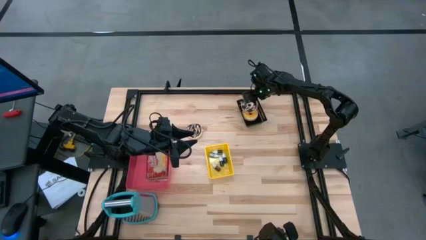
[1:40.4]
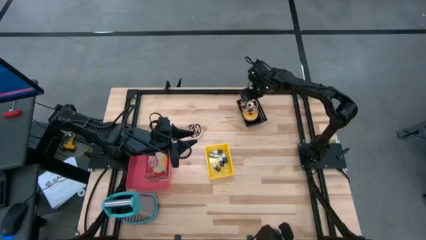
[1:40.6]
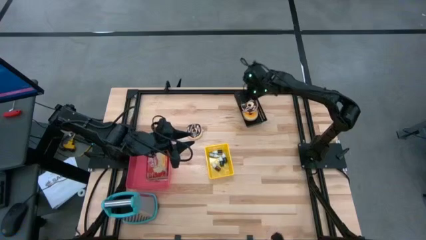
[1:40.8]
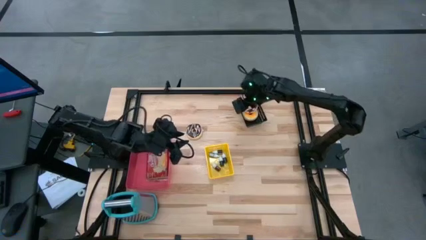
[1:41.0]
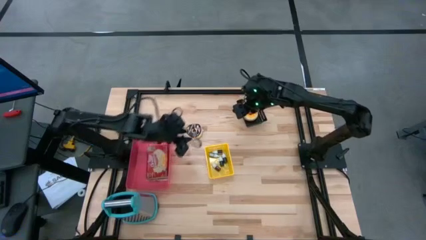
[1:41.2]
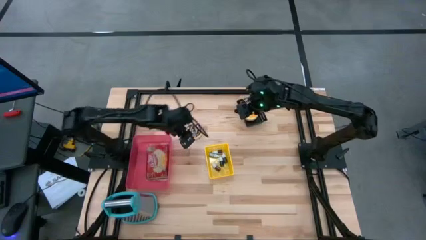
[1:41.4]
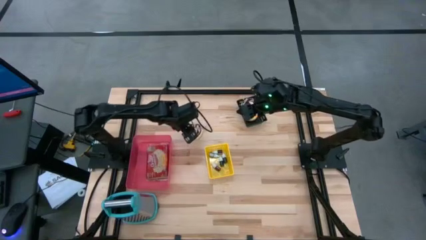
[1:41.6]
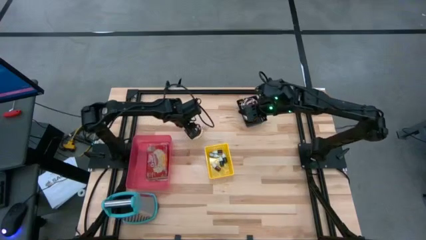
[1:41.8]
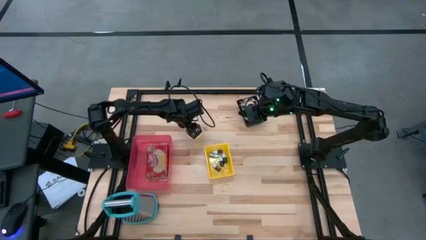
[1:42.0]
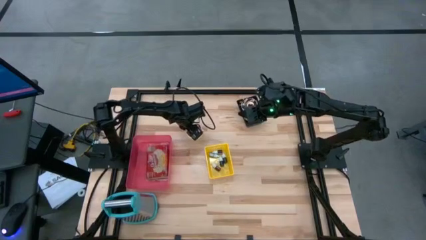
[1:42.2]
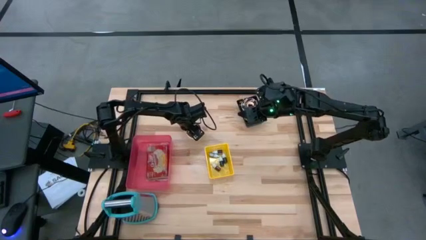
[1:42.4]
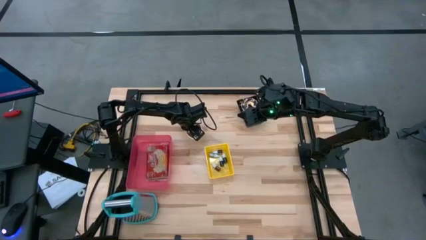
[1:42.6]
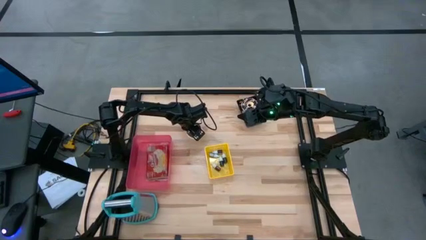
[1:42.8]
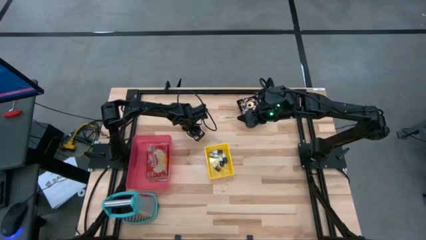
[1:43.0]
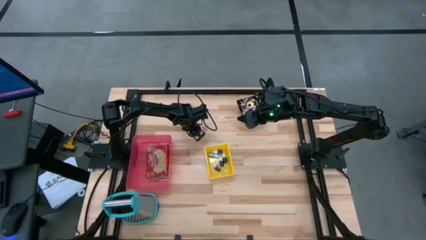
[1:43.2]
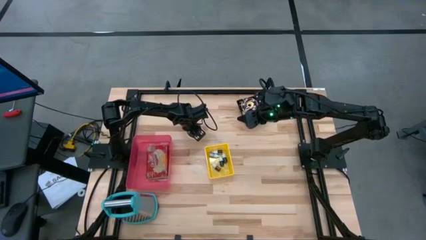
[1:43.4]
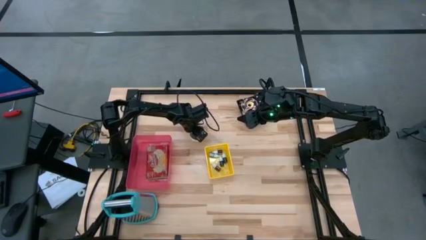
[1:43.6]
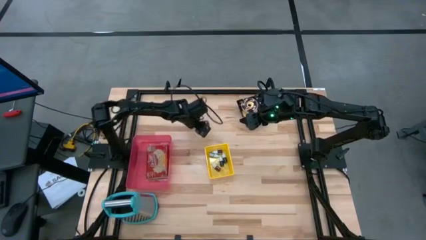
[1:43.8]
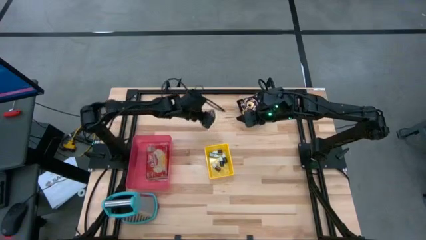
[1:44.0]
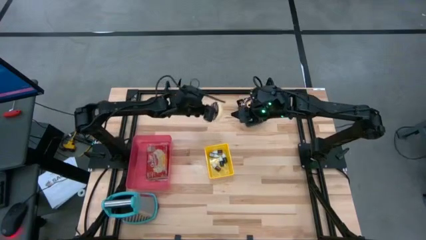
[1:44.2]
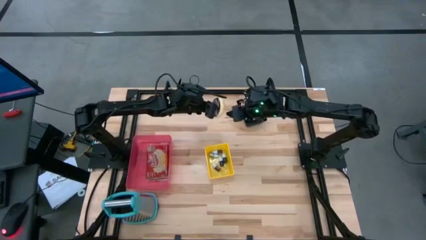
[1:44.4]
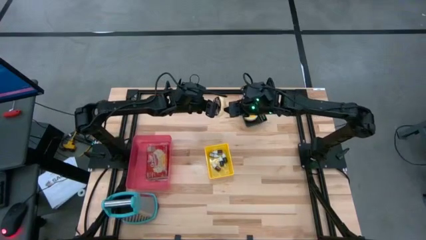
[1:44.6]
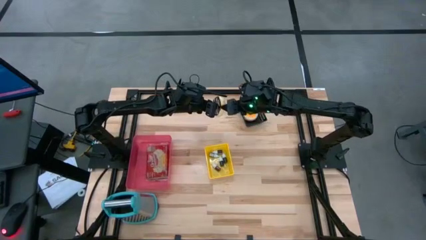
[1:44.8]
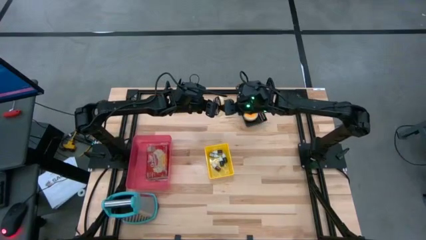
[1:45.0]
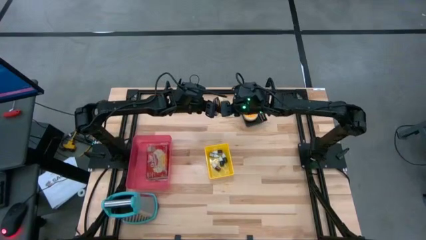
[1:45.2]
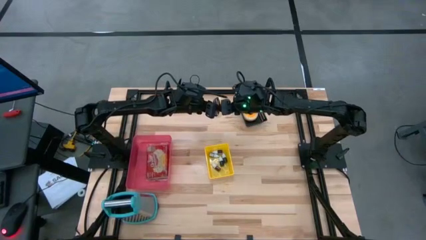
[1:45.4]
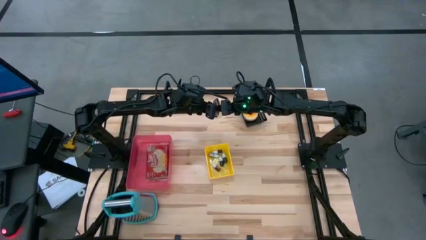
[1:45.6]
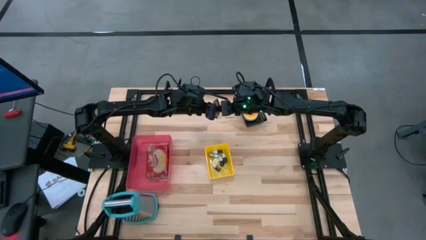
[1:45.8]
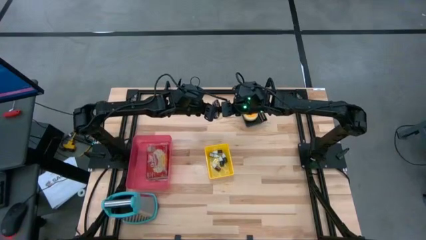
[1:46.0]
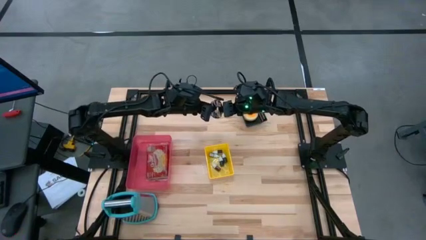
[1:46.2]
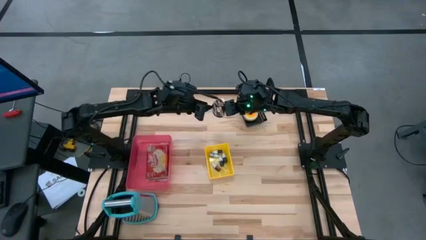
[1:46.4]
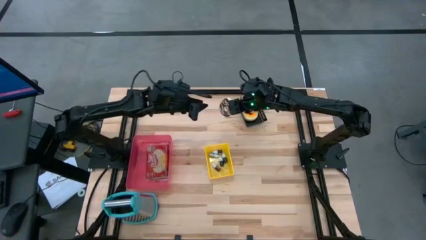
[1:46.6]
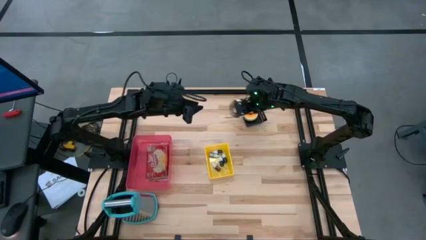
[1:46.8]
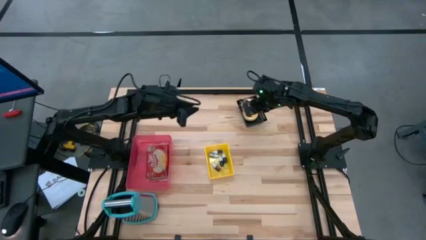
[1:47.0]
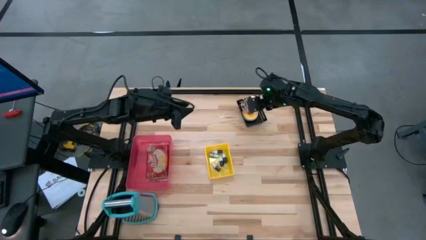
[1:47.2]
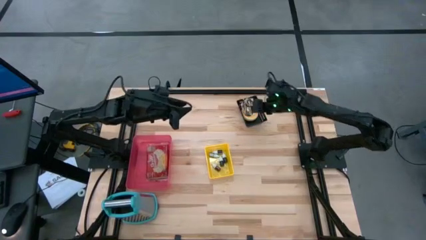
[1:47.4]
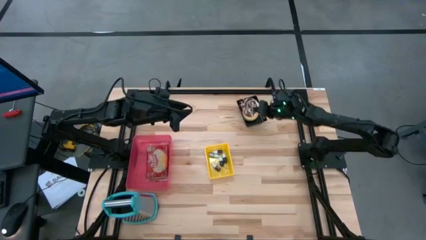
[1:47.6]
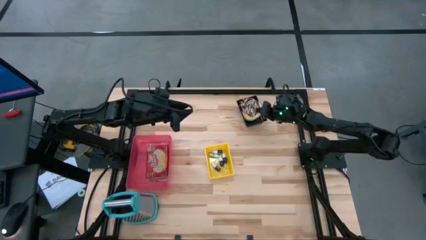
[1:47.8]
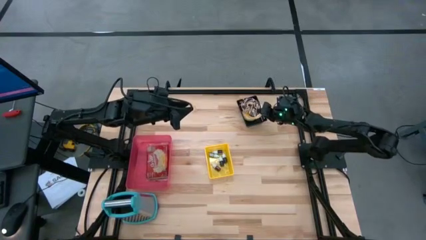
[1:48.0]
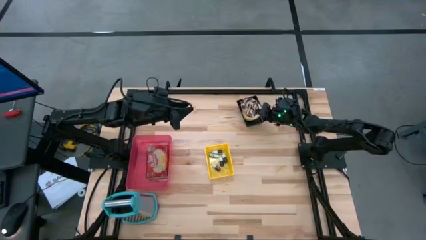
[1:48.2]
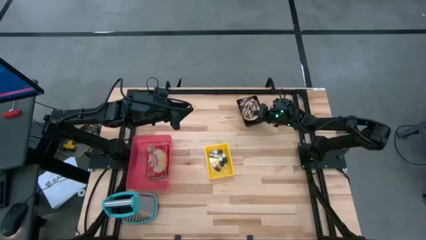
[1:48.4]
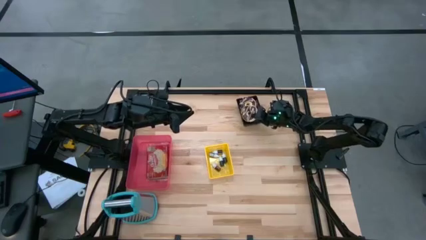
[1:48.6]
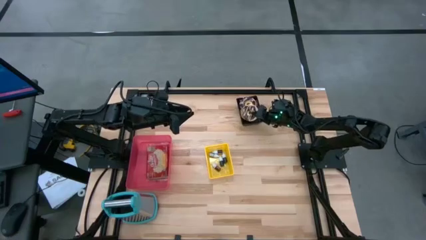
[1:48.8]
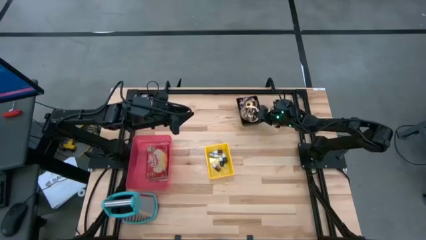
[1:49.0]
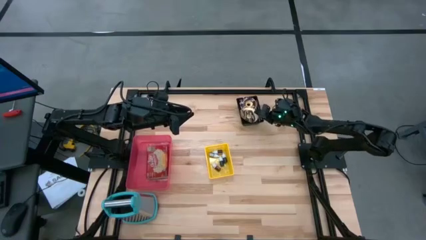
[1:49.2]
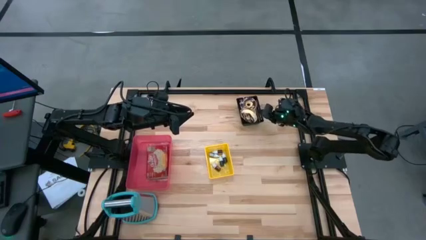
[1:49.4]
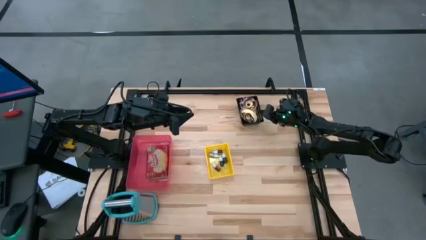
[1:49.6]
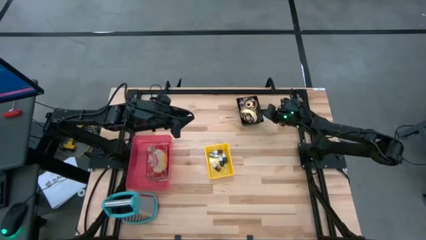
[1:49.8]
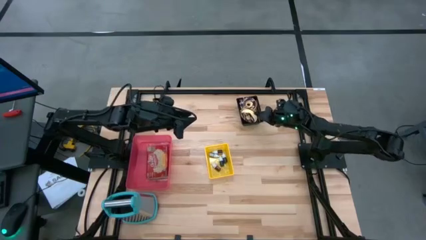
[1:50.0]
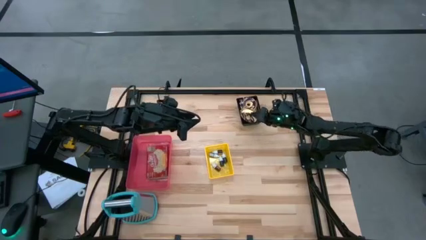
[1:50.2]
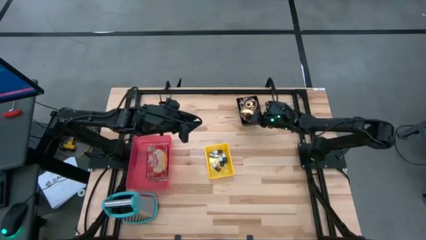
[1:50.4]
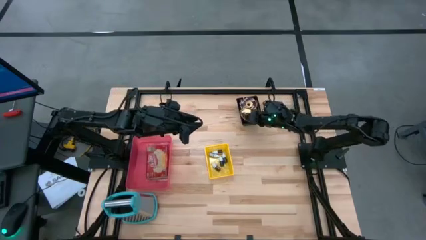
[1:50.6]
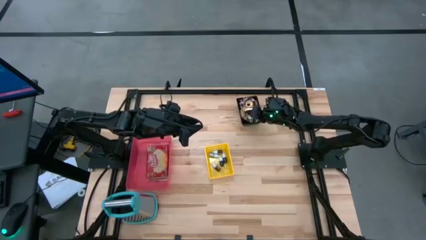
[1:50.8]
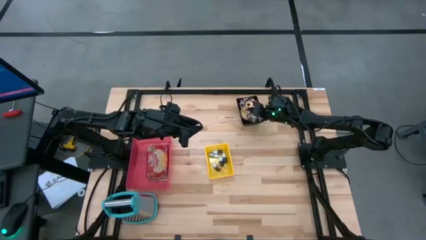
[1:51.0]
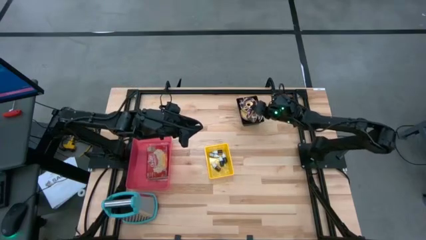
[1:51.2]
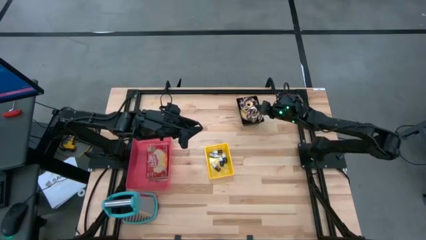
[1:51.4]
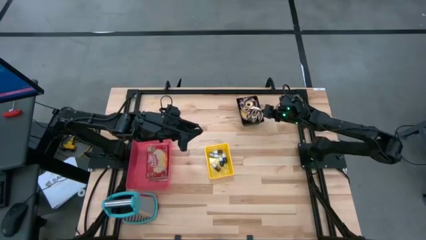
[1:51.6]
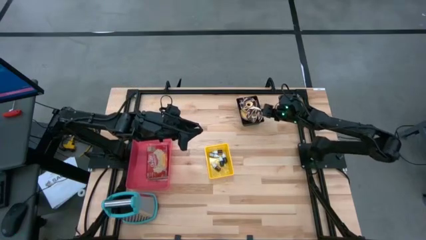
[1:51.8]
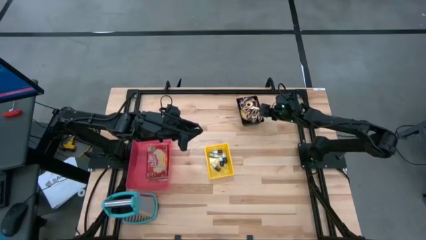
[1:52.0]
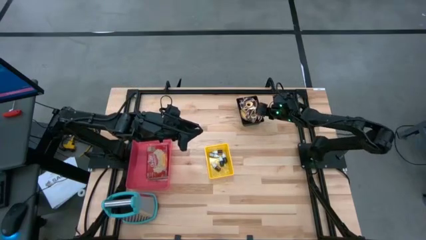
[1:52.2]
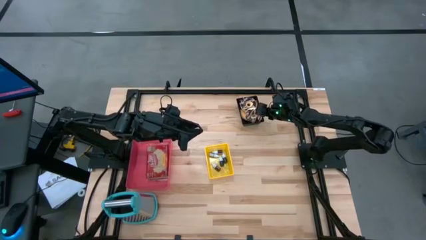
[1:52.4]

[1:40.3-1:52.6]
Put the black donut into the black bin

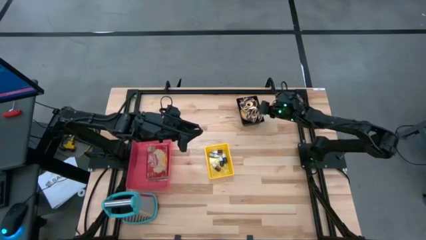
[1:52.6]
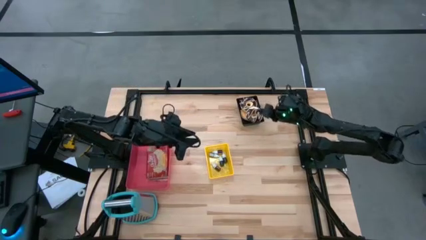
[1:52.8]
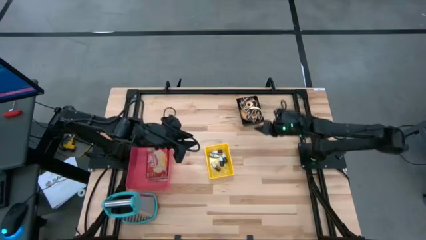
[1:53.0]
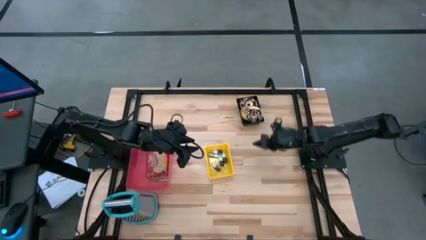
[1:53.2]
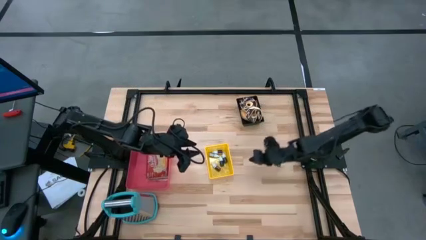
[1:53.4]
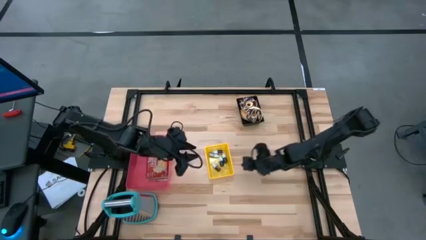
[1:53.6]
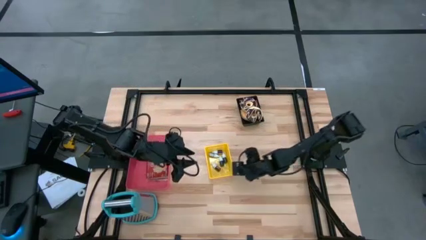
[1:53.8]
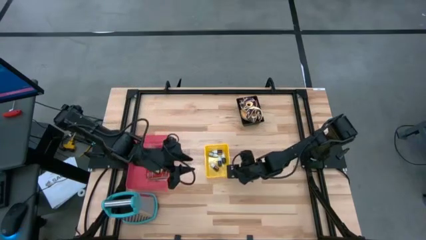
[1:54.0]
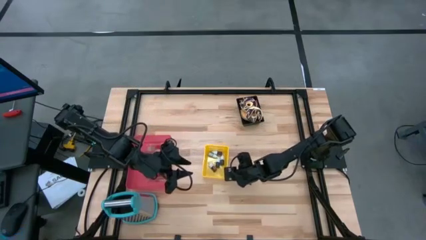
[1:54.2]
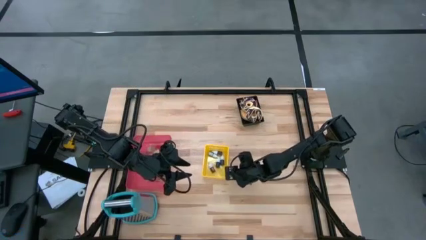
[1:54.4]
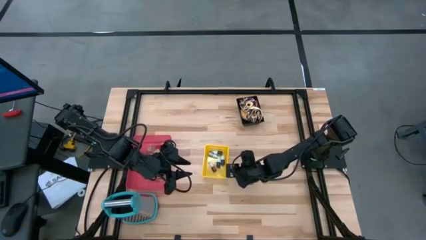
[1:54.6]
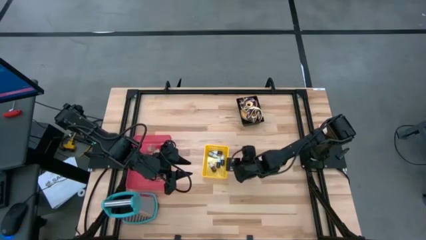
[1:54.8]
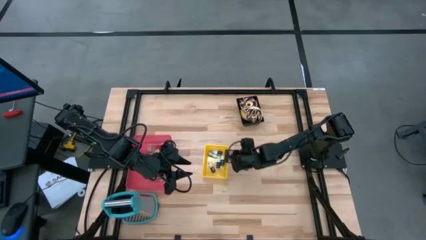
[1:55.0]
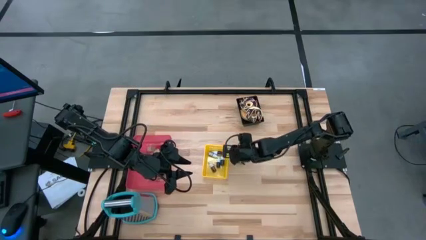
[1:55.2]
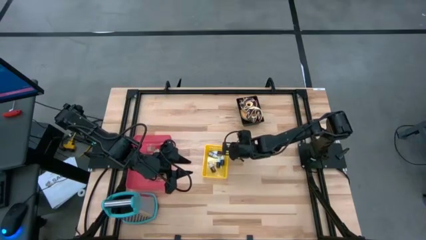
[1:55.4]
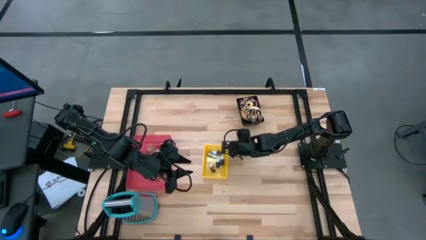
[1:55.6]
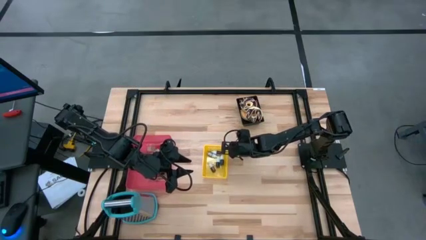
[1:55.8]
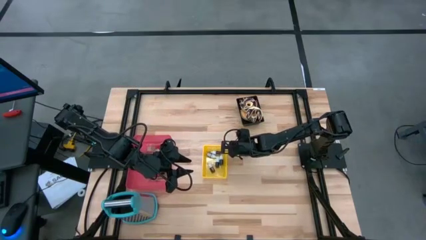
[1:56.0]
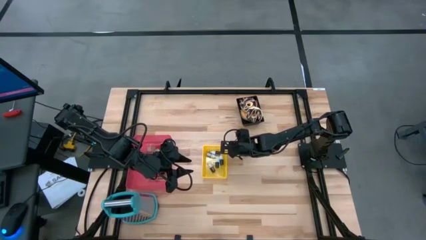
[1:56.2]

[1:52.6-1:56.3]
Adjust the yellow bin
